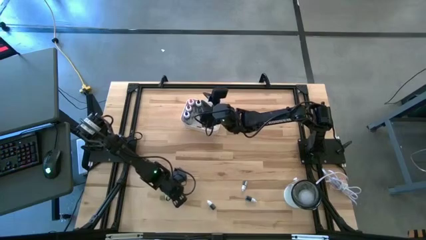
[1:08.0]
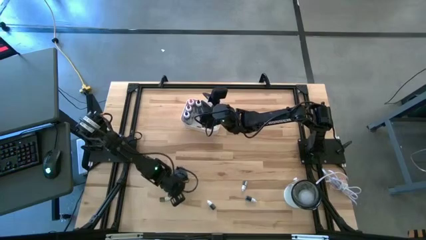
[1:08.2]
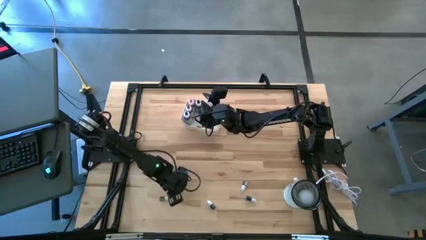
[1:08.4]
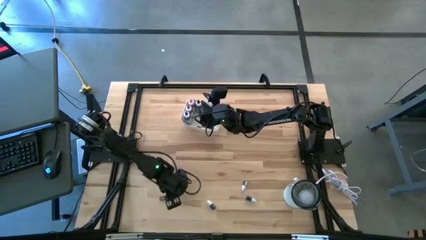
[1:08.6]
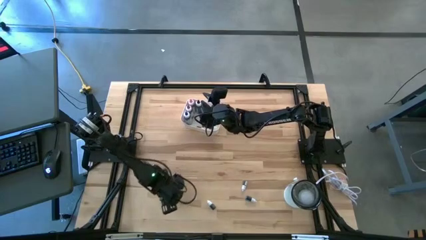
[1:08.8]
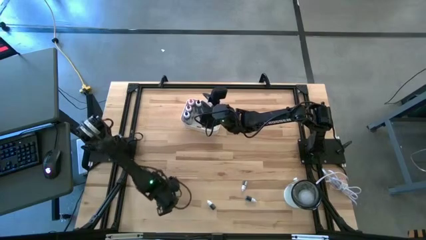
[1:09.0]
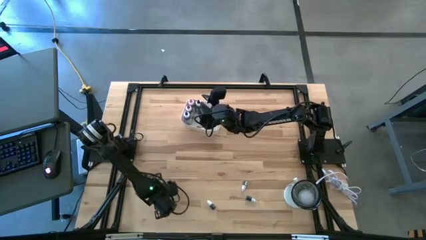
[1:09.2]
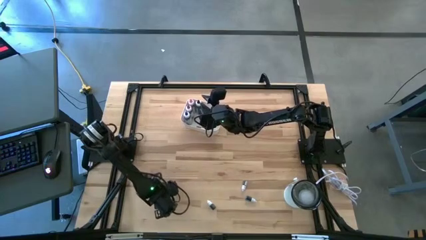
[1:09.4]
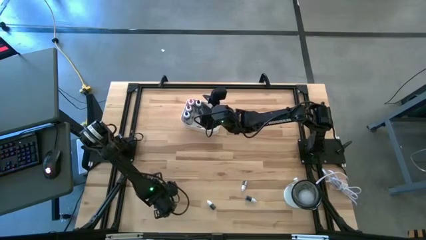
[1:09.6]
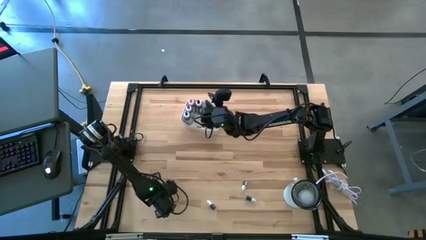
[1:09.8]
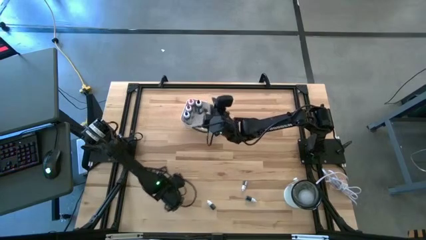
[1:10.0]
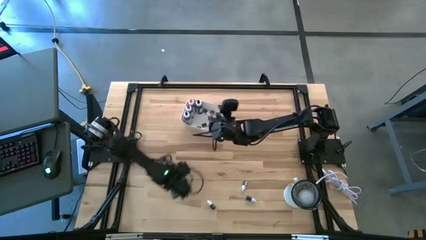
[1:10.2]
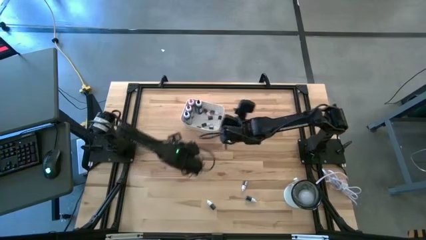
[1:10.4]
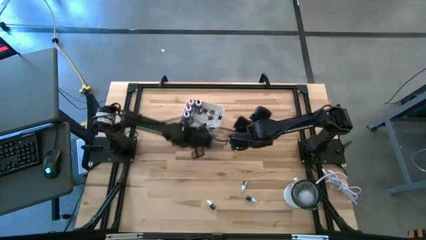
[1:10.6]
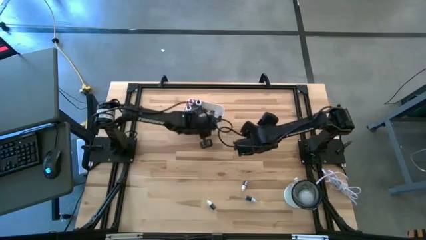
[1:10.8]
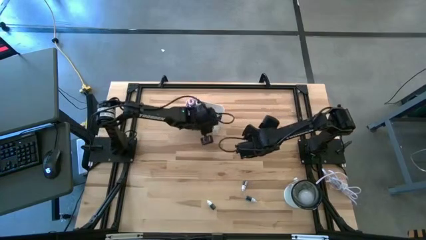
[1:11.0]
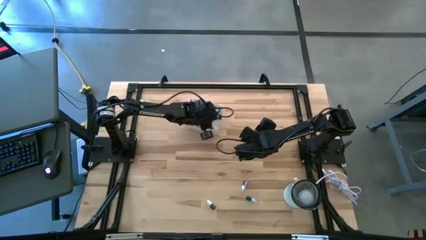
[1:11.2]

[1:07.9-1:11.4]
Task: Pick & Place food coloring
Put the small left green food coloring bottle into the white bin

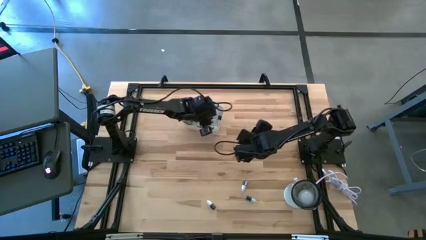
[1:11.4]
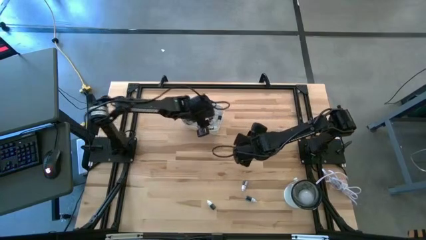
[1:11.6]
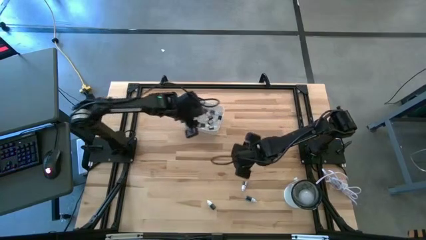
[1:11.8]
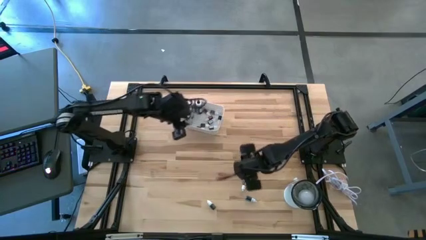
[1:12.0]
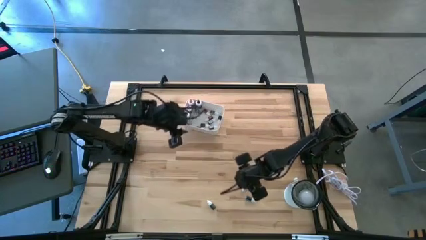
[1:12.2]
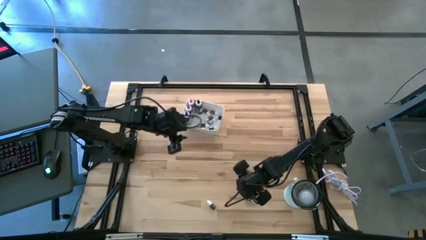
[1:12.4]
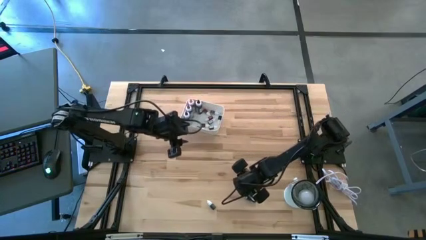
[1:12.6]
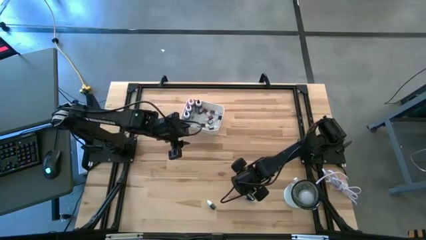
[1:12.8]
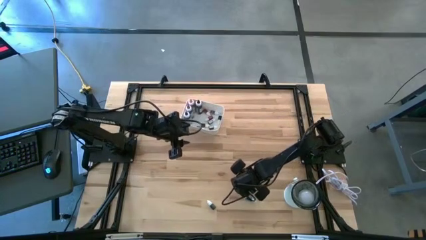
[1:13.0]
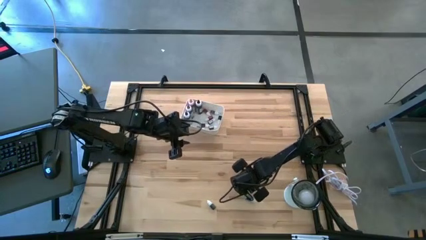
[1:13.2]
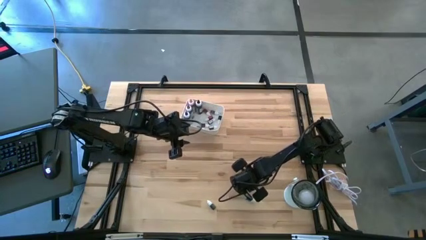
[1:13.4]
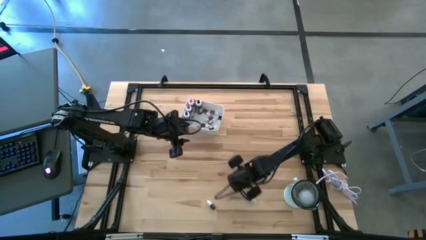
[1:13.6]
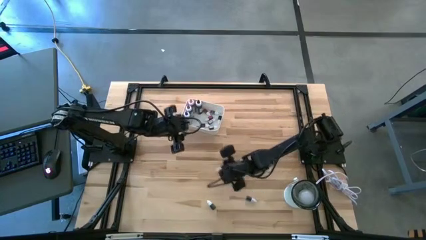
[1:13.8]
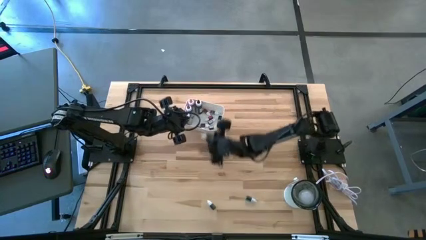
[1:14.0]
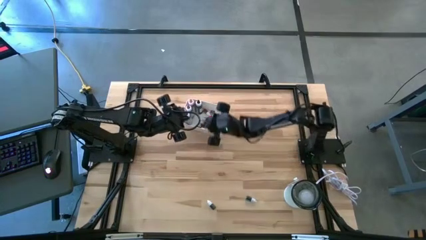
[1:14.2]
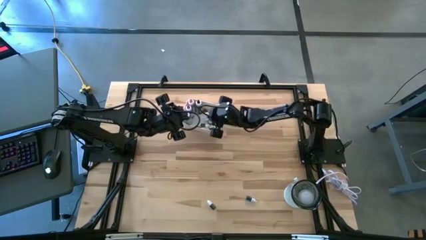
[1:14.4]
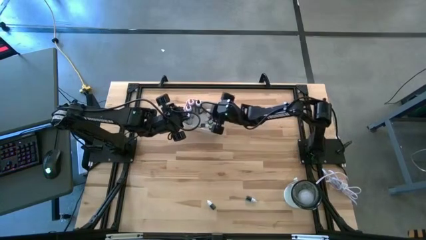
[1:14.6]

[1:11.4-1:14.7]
Put the small red food coloring bottle into the white bin

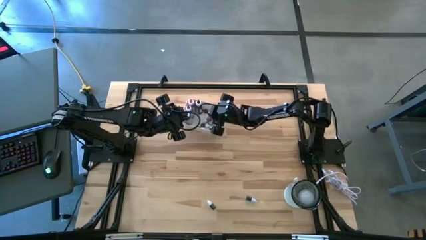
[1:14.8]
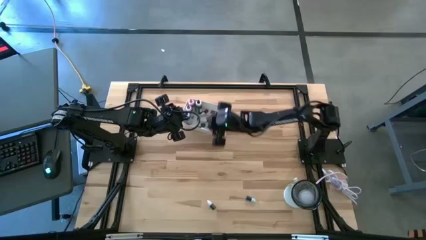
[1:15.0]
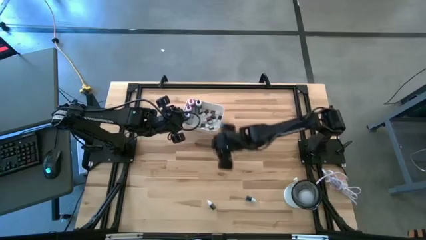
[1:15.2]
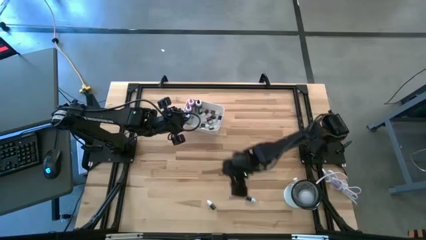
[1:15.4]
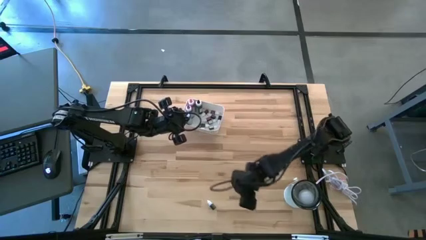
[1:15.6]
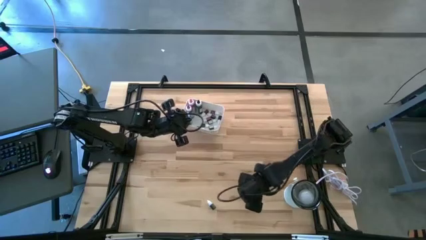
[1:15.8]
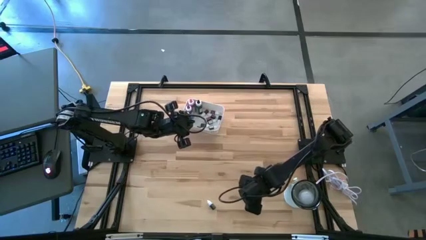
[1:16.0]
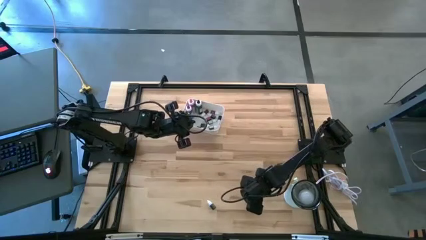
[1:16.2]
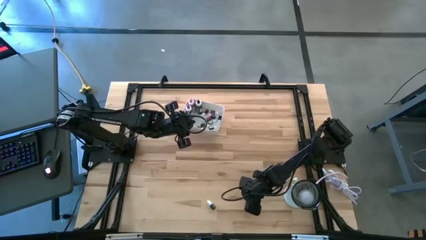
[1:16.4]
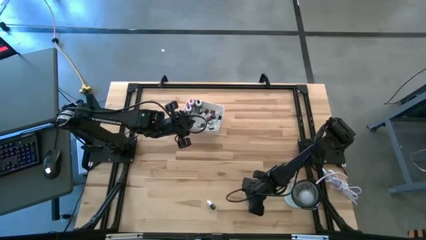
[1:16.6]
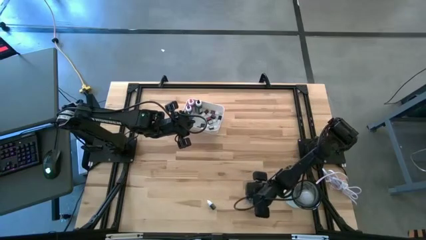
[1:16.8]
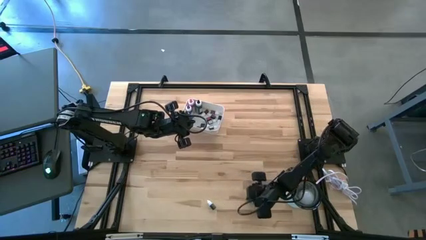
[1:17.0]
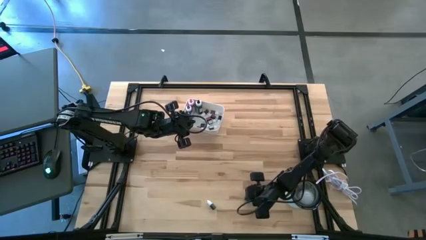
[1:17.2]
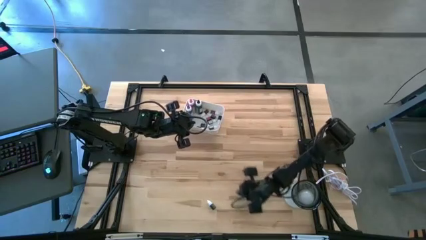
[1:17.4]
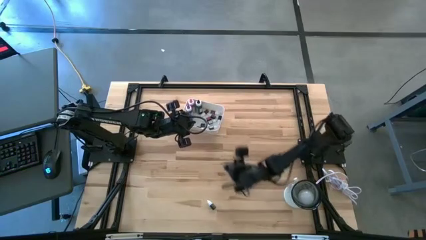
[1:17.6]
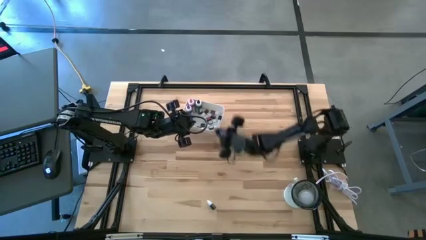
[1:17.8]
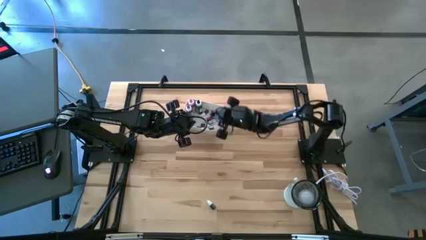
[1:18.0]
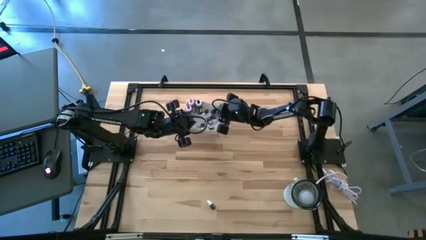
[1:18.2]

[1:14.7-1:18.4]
Put the small blue food coloring bottle into the white bin

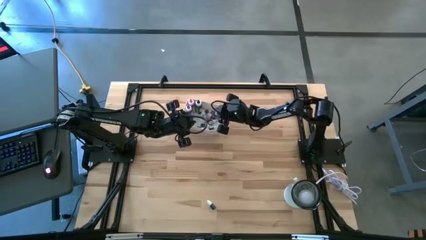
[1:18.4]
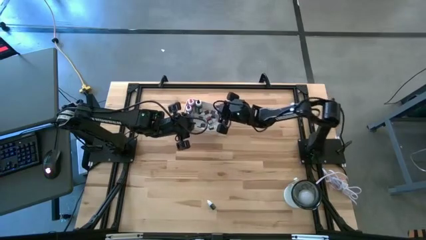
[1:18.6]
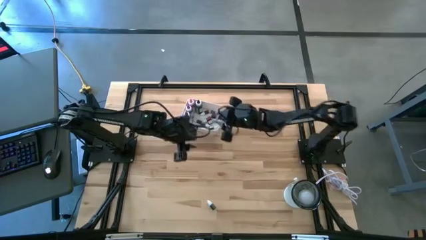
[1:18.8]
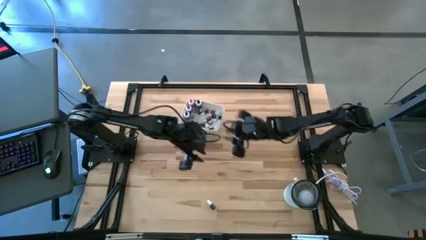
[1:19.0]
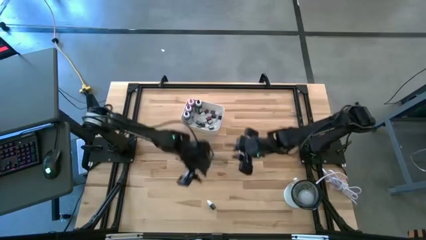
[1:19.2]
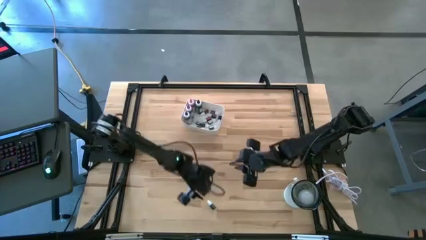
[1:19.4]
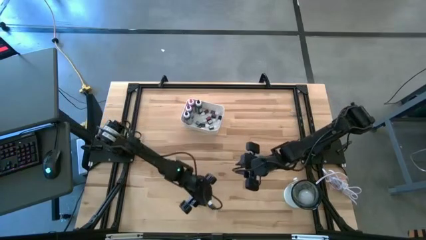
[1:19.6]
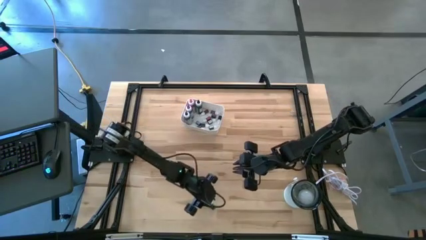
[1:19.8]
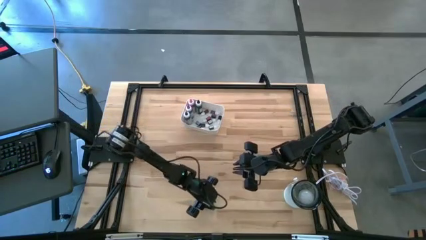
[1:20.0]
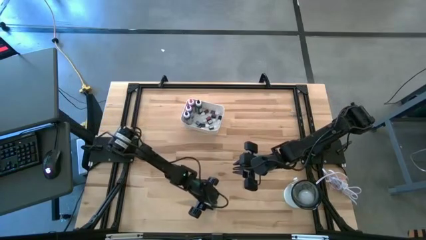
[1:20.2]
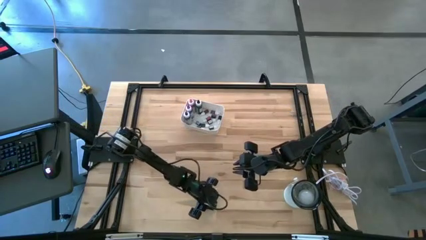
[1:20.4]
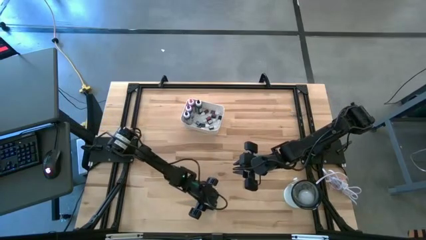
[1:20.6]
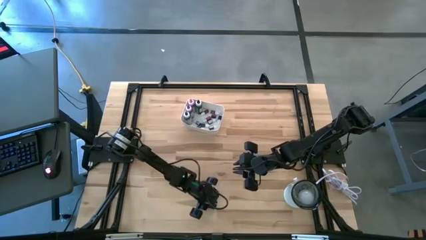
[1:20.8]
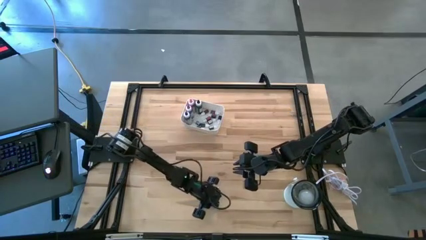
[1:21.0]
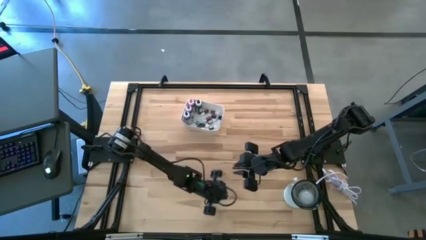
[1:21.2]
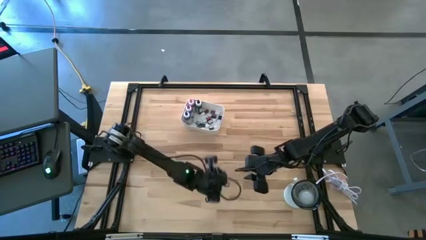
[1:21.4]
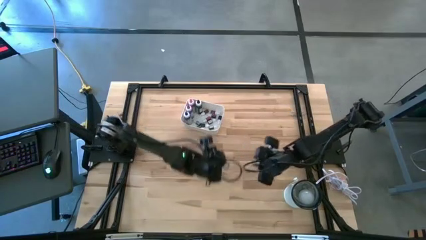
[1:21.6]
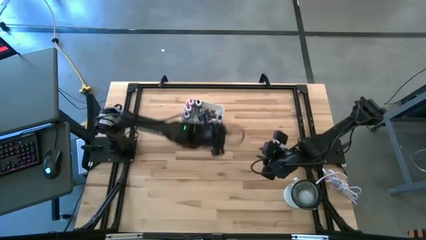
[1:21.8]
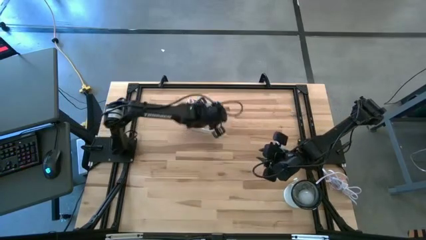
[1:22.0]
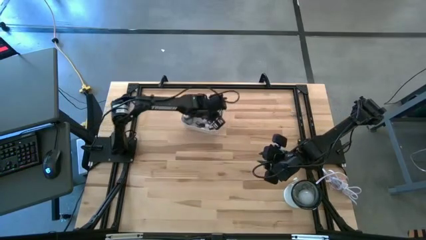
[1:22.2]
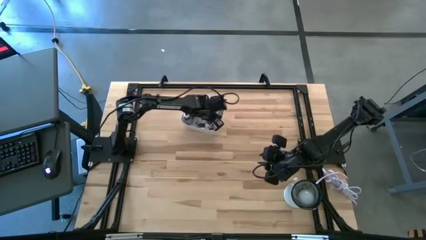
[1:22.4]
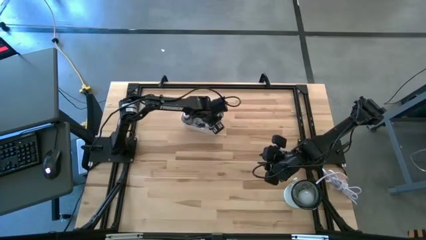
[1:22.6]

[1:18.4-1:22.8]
Put the small green food coloring bottle into the white bin

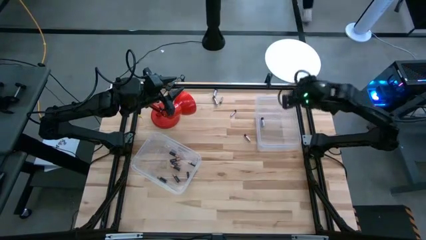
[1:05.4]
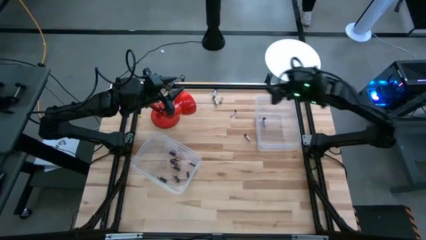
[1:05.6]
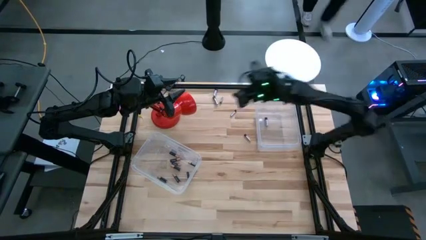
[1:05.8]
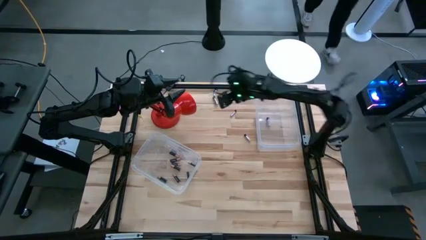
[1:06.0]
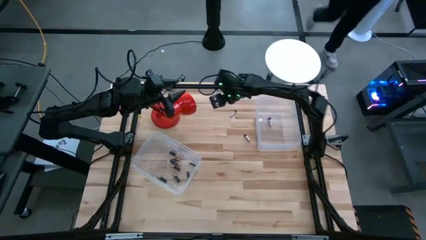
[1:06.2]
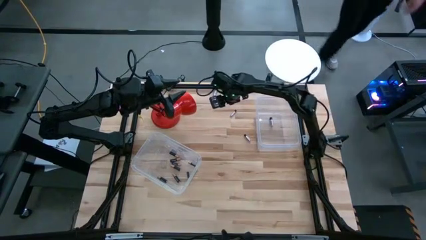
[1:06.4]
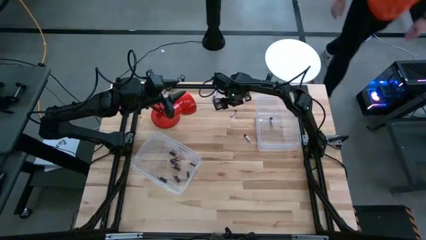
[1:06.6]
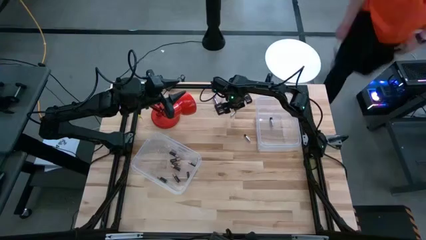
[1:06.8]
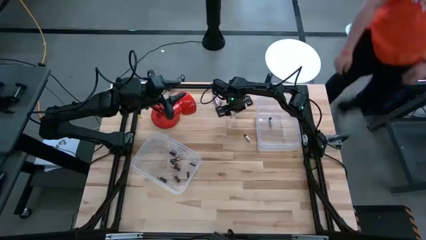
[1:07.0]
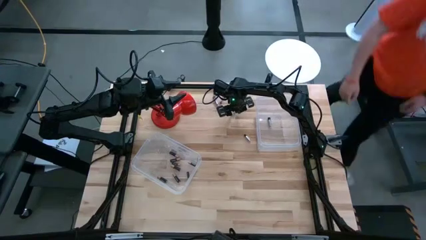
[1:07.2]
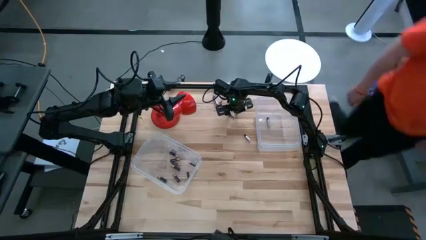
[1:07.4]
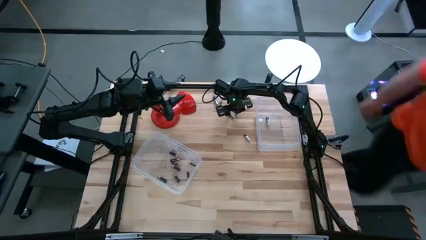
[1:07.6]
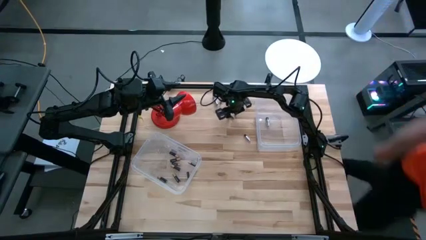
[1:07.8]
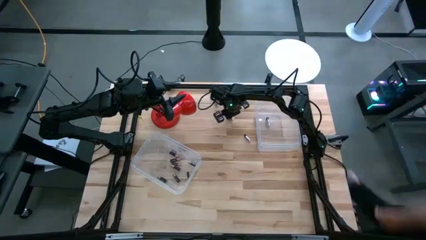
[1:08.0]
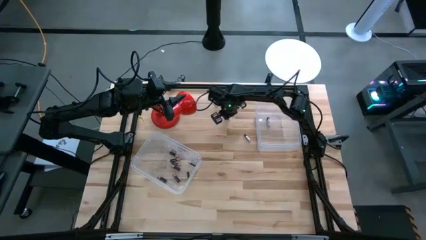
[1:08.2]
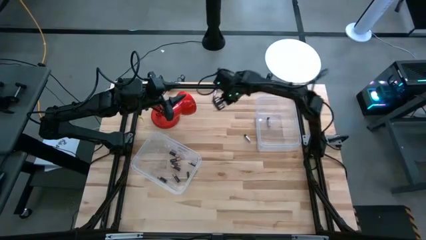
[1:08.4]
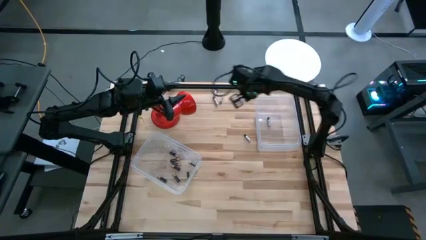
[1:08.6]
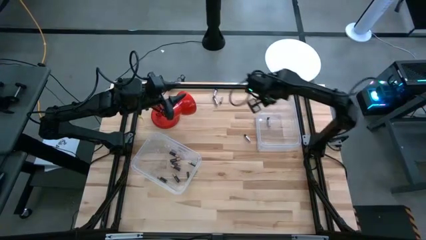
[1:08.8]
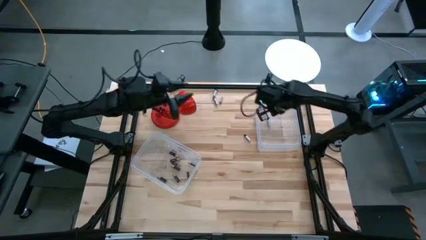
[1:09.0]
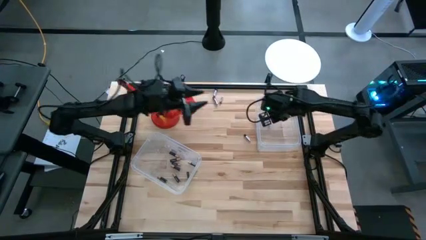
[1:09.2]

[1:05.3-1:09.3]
Task: Sort batteries
Put the silver battery into the top transparent bin
